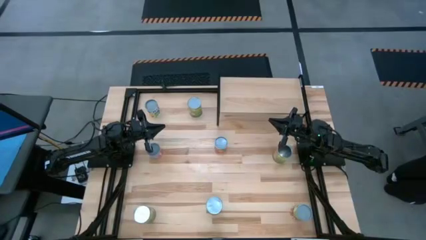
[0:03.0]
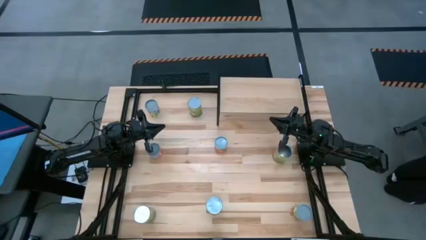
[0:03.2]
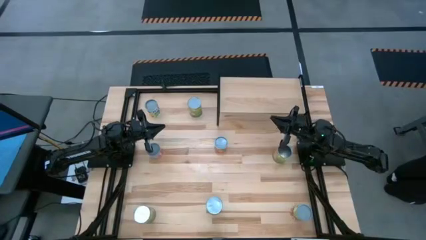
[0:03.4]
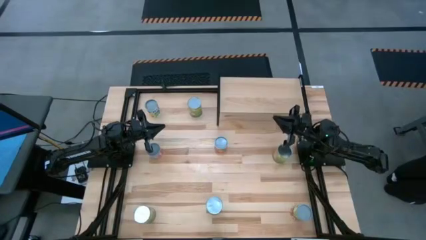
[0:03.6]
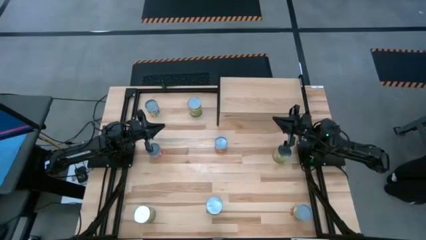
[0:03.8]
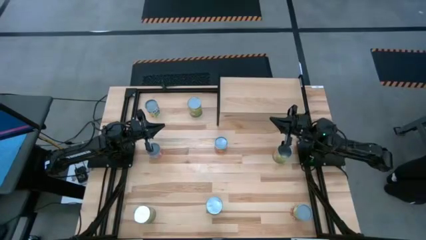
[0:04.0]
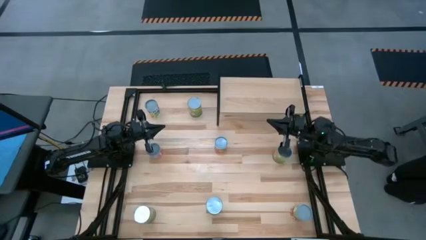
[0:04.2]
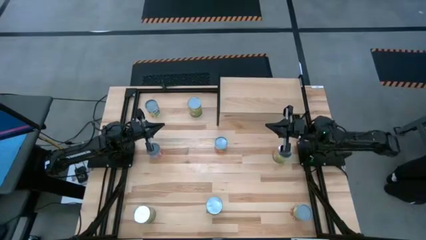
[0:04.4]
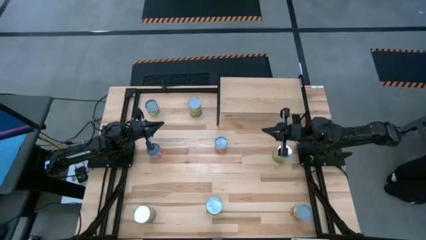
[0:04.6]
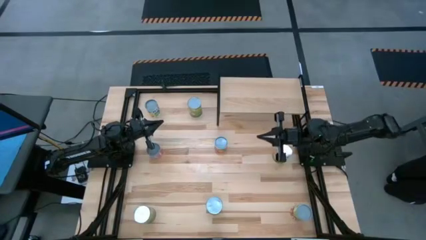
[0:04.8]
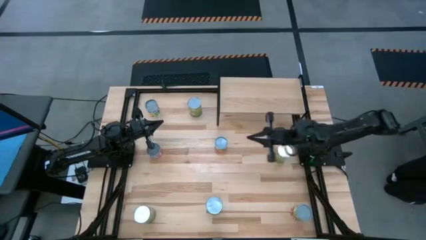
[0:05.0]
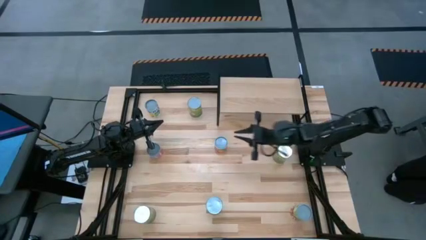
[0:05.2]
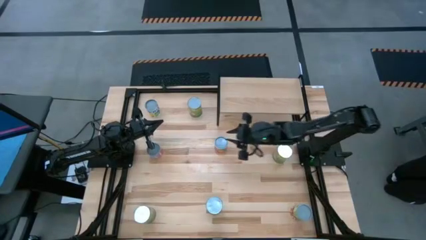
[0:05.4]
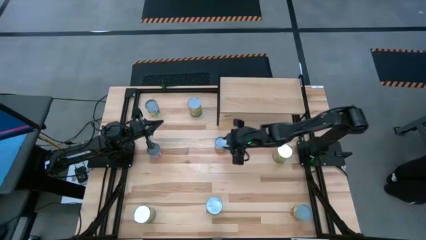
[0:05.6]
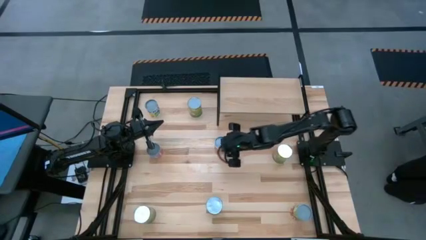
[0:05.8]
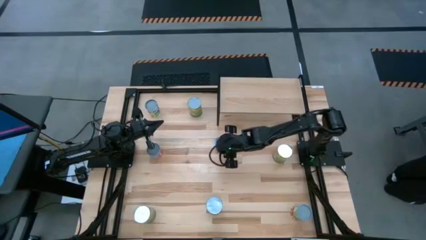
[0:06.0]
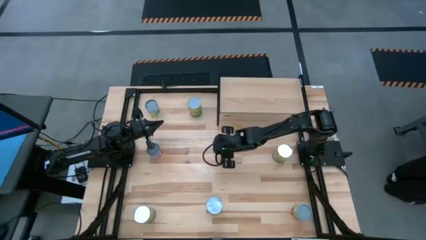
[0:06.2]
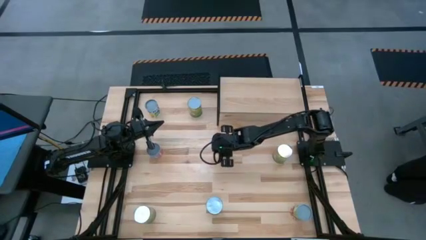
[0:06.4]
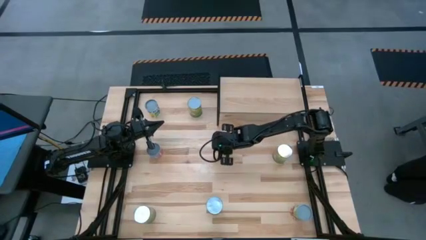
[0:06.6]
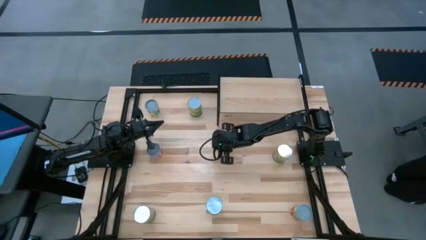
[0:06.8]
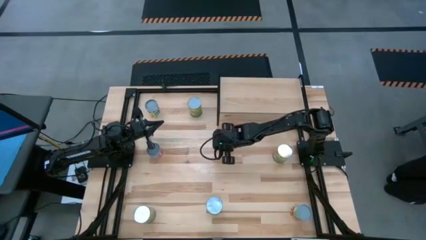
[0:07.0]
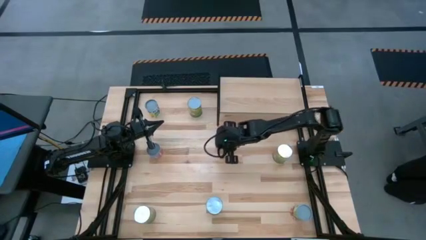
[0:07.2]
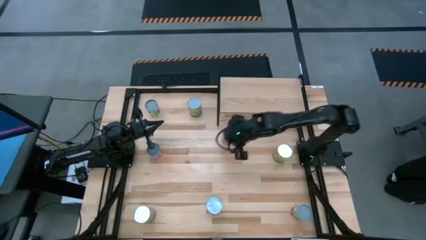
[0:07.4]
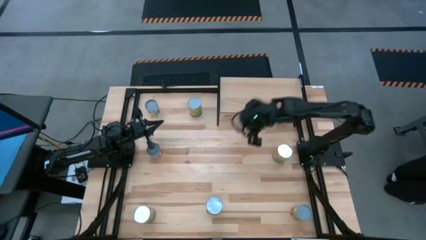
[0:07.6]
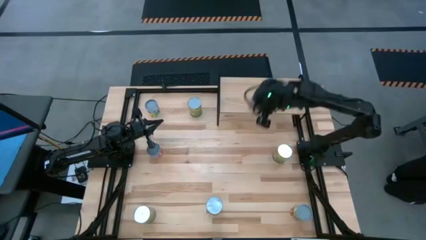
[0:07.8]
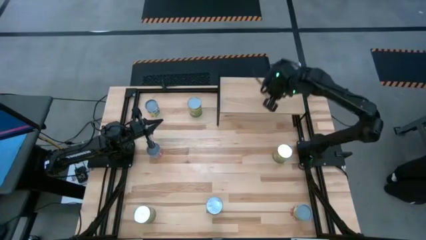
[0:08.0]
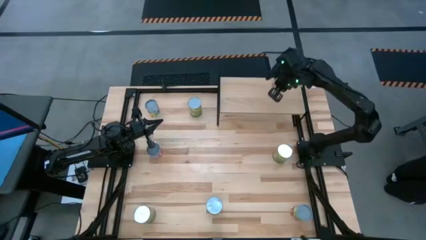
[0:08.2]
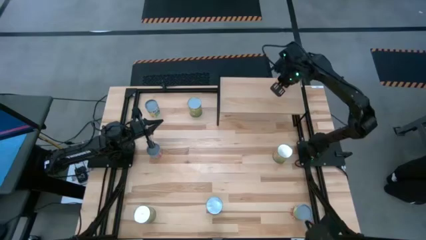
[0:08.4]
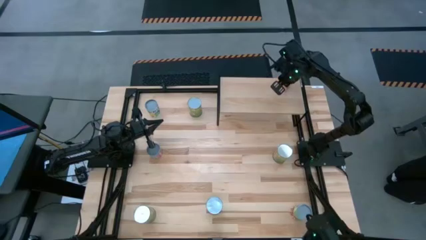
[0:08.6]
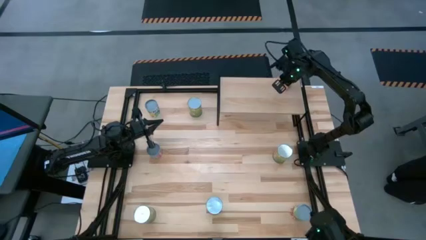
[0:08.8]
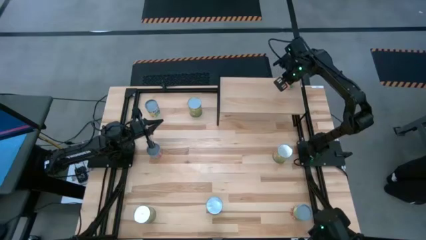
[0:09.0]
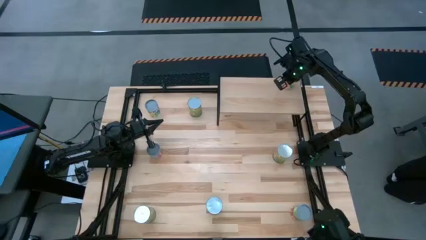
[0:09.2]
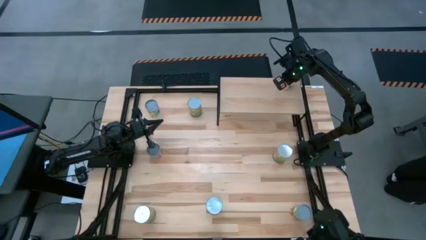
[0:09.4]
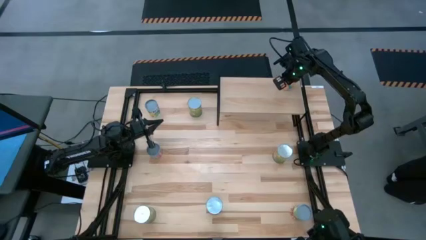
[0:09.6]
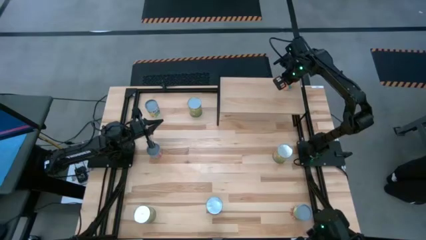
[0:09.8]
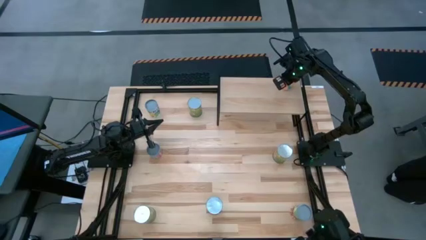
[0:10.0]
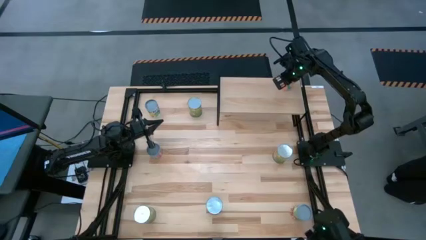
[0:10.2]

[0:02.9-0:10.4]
Task: Pick and place cans onto a shelf
Put the small canned oranges on the shelf

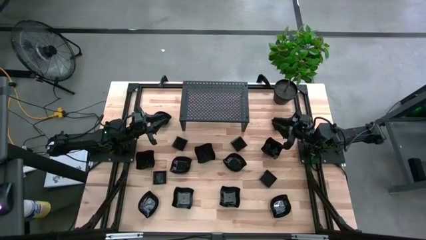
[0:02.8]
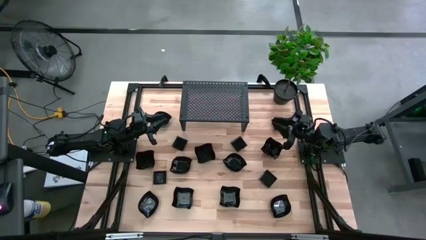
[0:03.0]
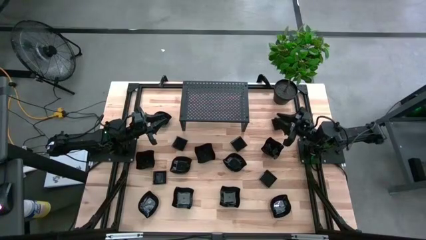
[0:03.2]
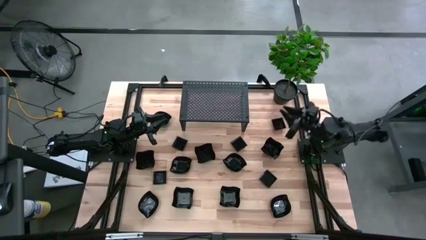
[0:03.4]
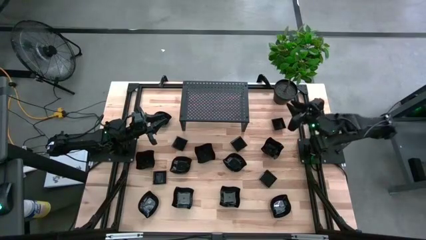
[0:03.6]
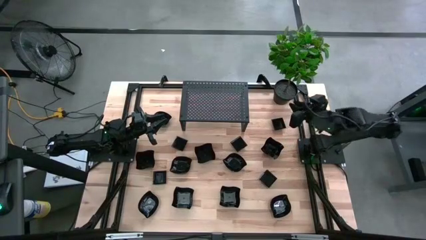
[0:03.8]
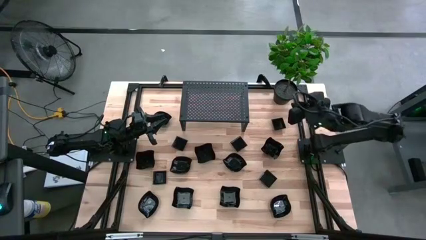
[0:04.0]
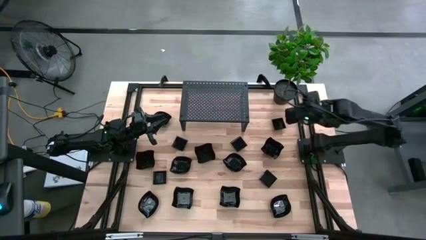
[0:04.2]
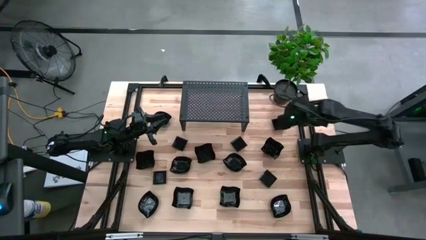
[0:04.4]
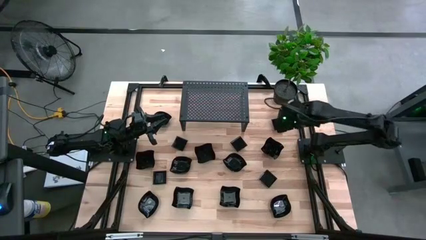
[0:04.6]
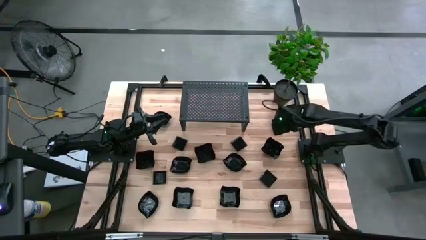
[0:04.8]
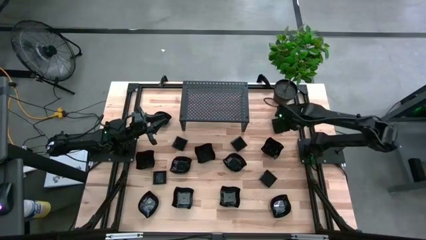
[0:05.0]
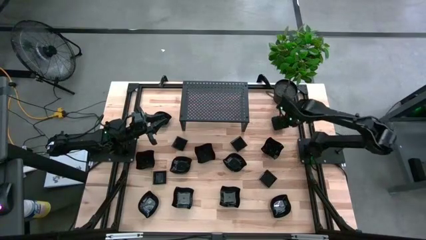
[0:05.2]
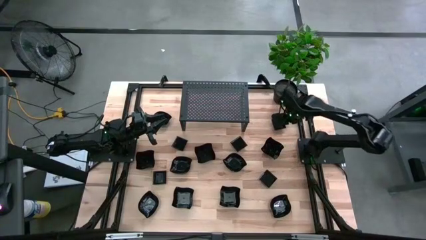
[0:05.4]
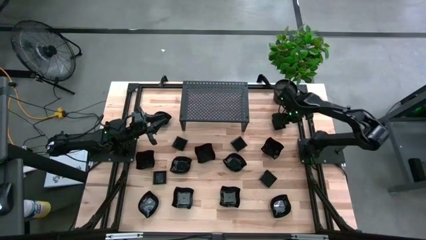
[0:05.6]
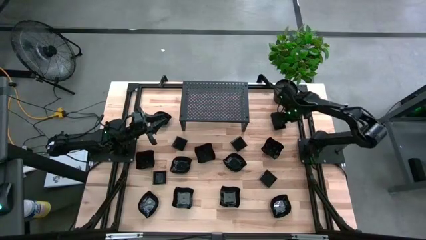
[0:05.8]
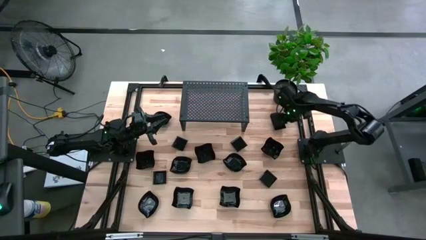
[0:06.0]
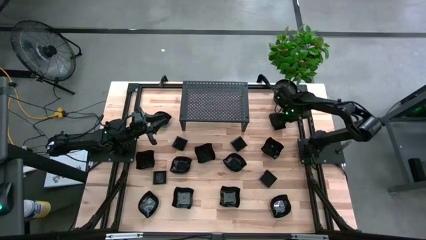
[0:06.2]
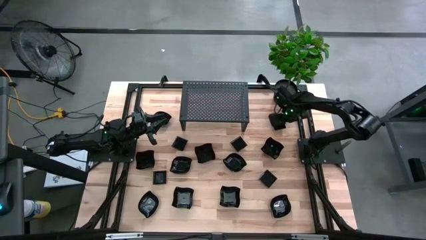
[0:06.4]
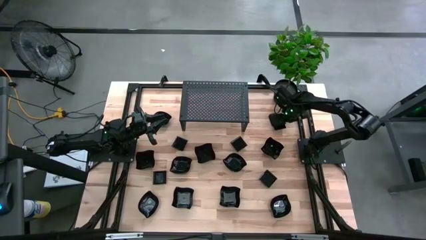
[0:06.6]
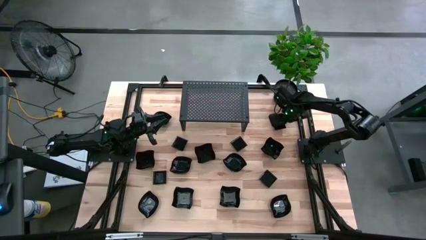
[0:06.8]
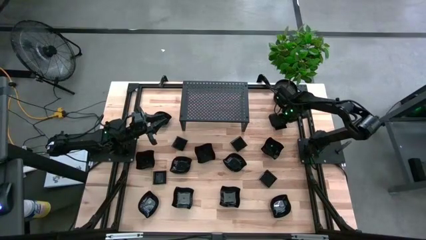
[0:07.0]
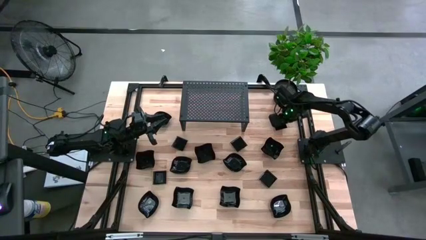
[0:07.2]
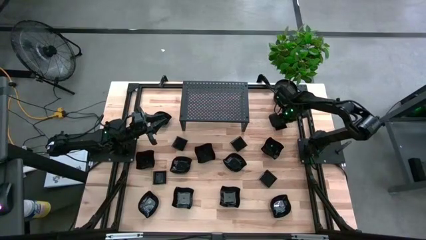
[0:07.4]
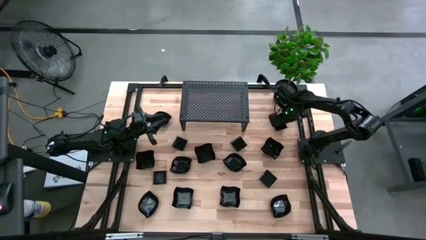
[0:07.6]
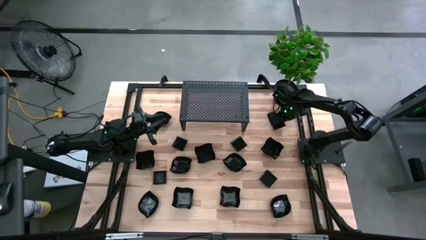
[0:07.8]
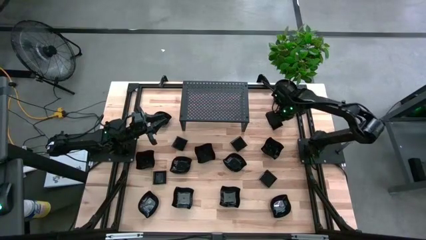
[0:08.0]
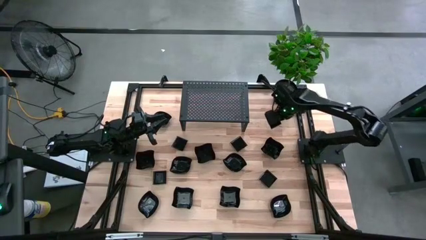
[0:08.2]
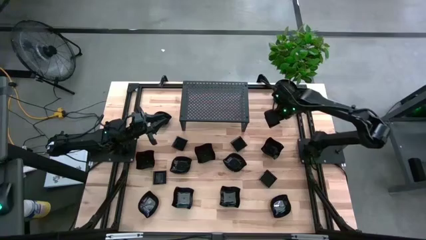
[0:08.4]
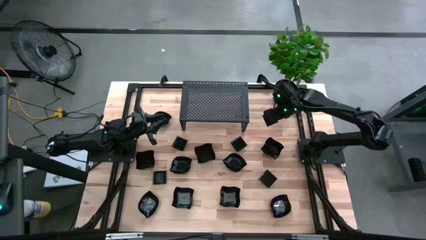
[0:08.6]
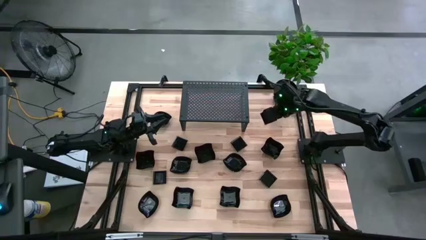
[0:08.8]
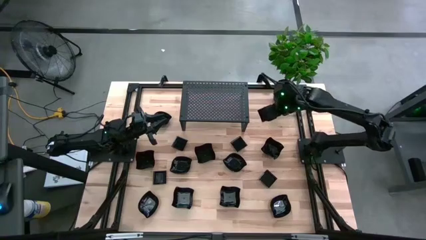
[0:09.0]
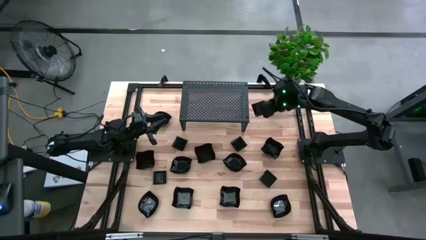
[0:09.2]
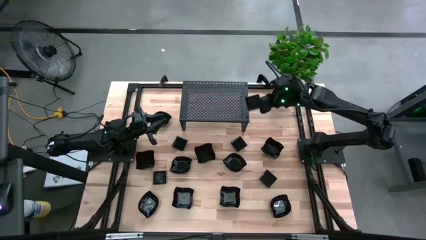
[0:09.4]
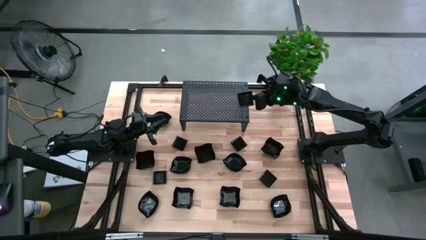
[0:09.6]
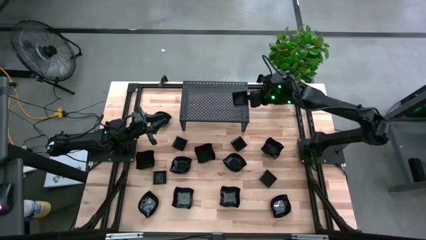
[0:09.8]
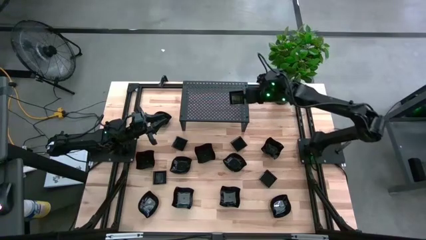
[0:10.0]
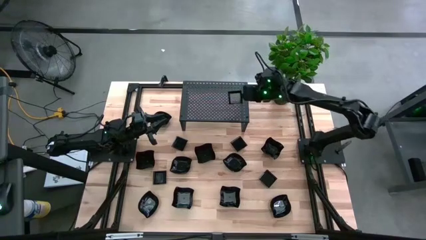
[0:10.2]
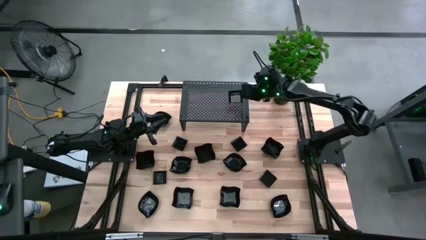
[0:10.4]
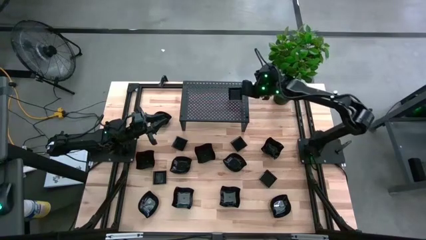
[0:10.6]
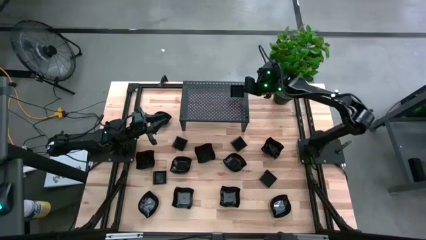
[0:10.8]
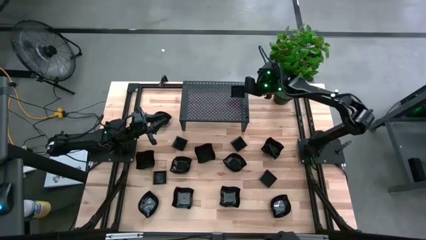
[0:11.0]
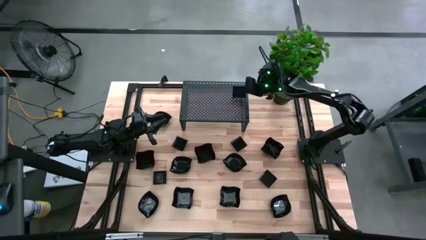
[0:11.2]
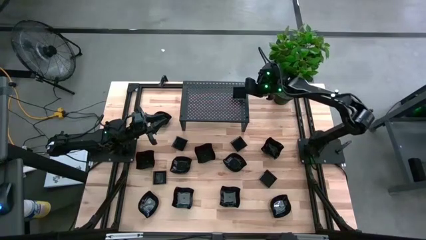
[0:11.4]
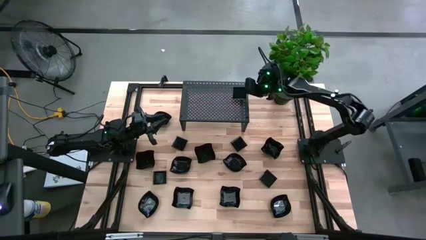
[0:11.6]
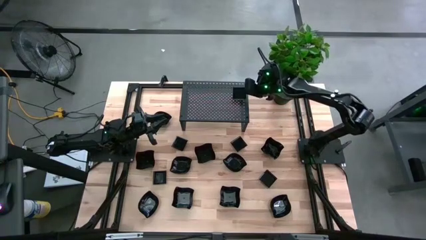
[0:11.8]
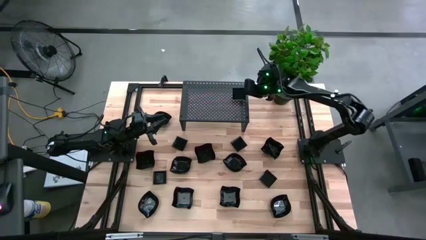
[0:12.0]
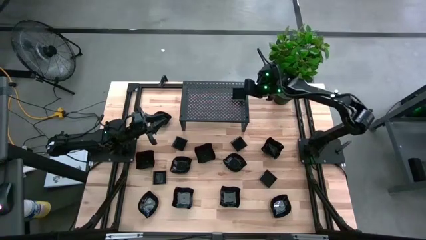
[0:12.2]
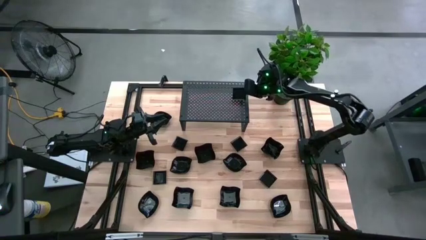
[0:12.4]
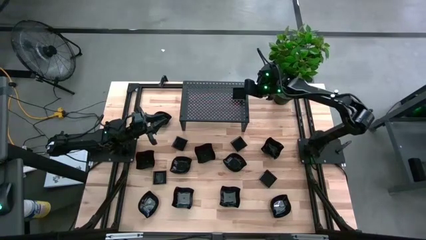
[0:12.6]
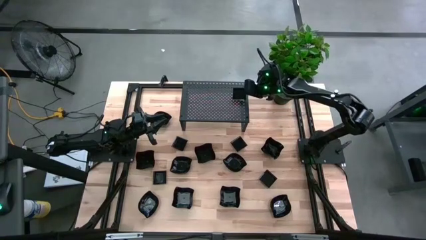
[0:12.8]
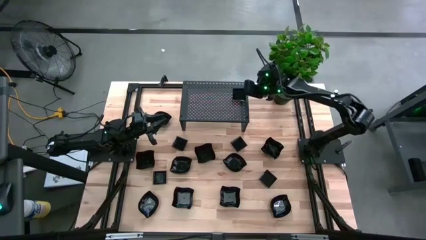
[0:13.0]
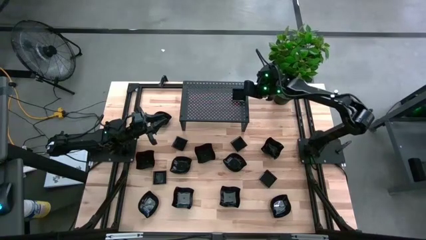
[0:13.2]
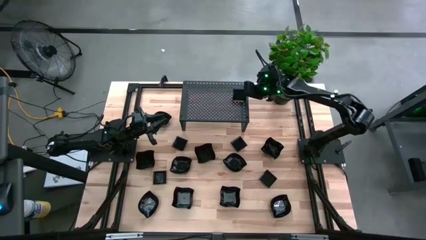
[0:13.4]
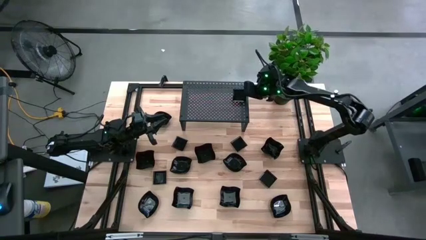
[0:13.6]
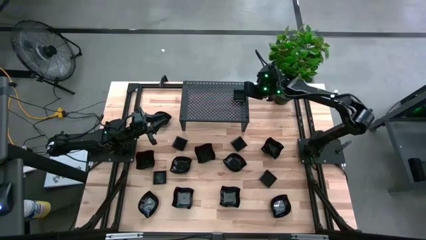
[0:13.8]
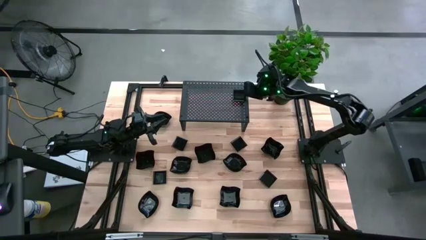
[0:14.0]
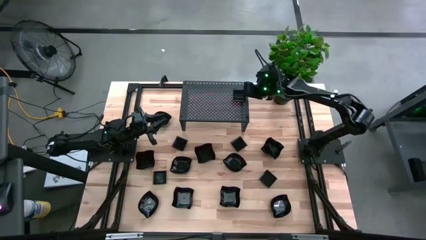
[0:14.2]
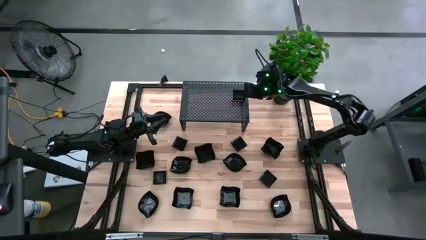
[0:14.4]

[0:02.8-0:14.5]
Task: Pick & Place Mini shaped plates
Put the square plate on the shelf
